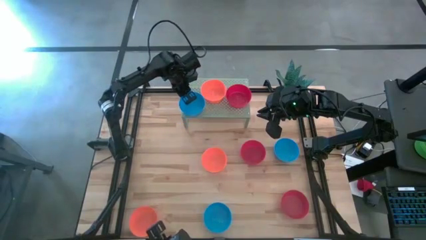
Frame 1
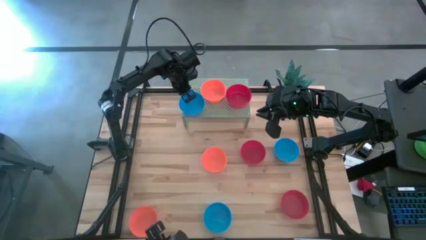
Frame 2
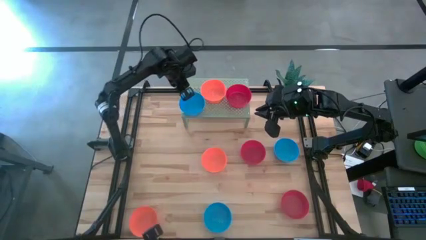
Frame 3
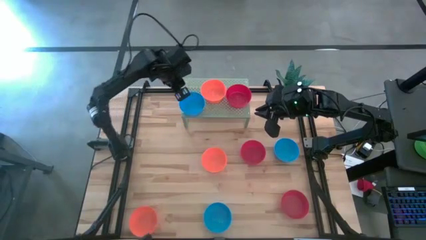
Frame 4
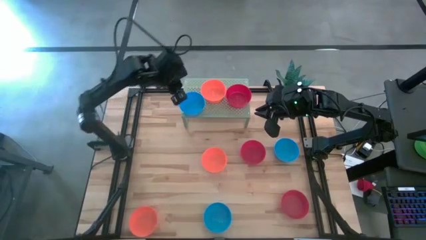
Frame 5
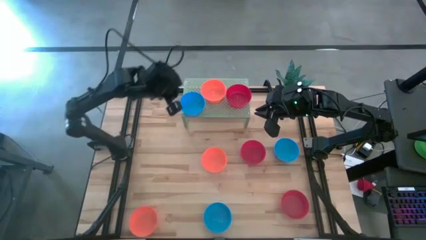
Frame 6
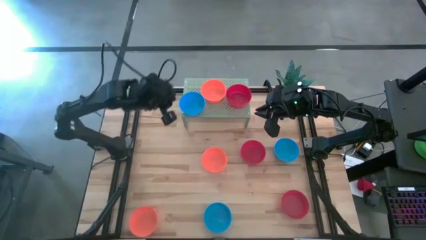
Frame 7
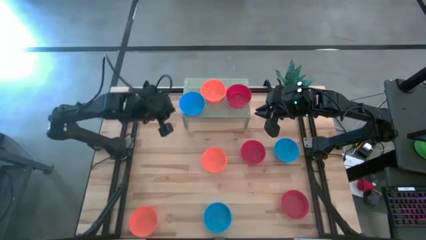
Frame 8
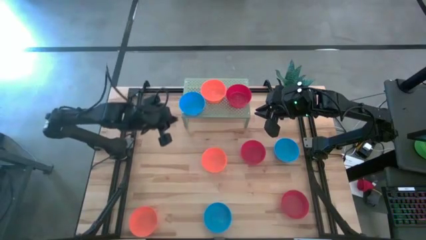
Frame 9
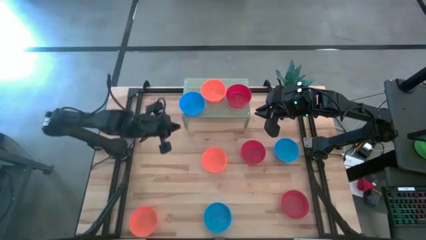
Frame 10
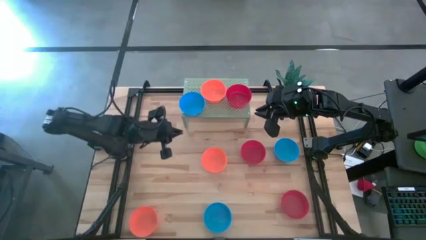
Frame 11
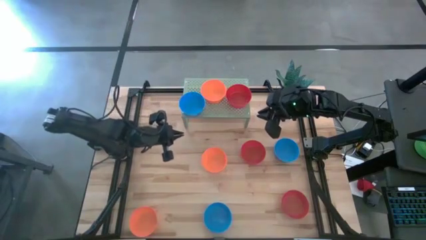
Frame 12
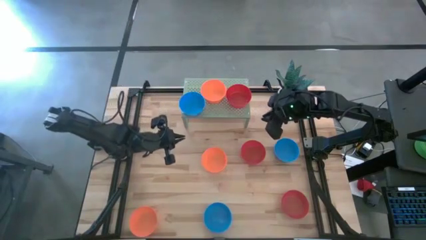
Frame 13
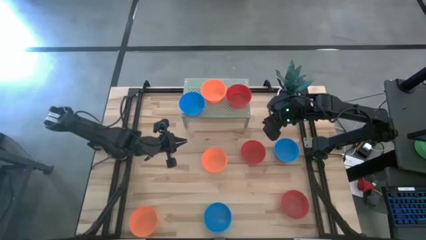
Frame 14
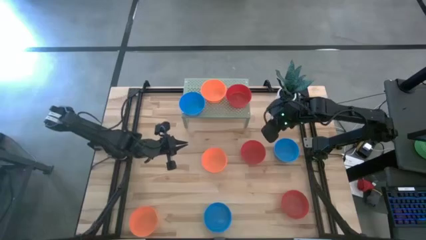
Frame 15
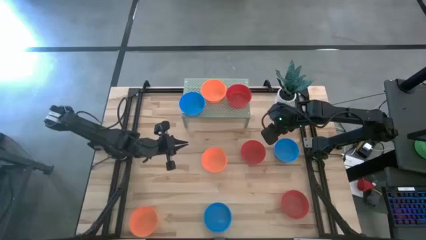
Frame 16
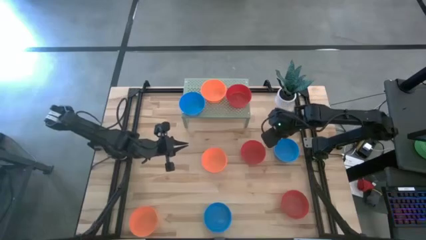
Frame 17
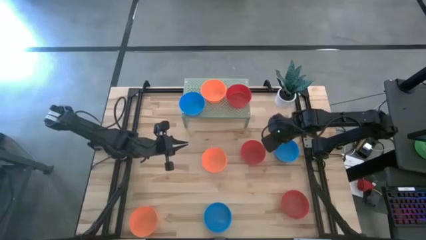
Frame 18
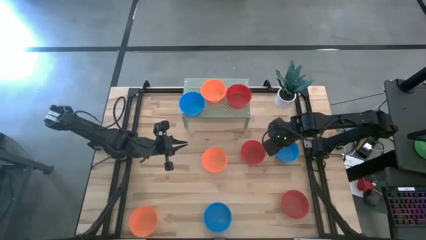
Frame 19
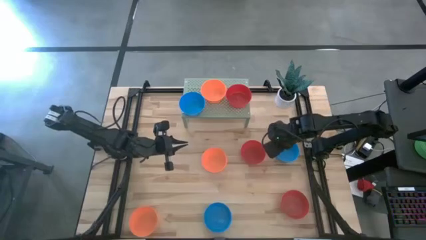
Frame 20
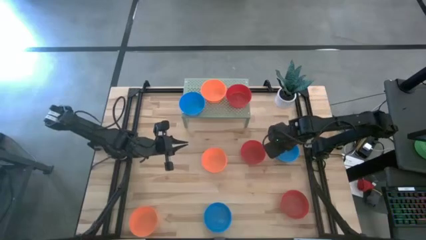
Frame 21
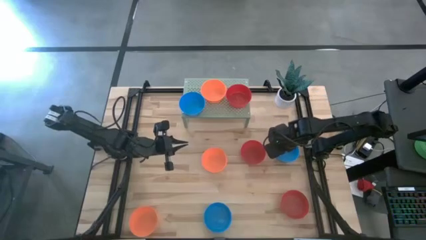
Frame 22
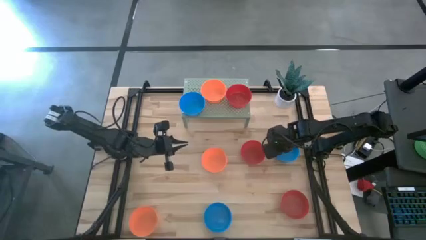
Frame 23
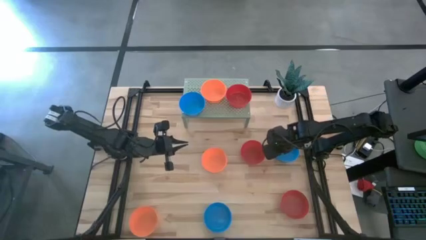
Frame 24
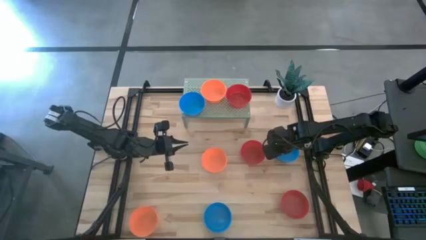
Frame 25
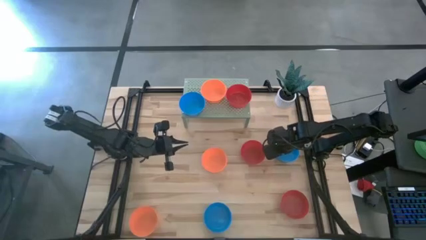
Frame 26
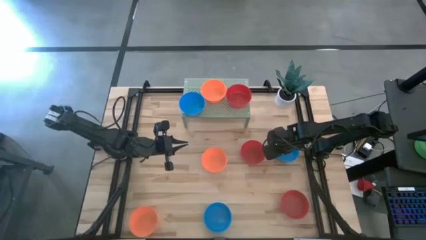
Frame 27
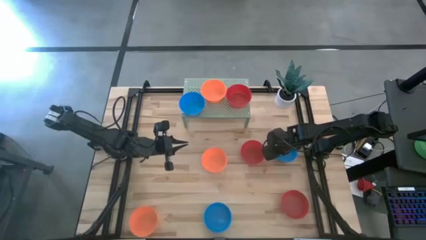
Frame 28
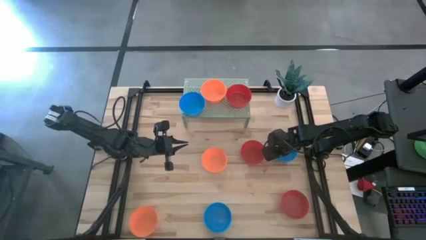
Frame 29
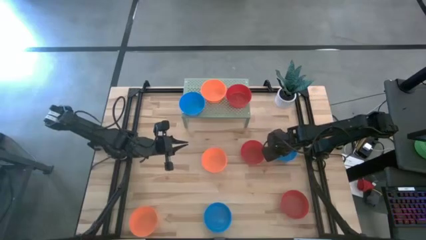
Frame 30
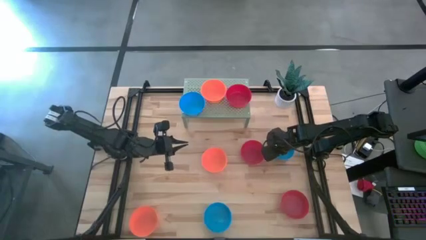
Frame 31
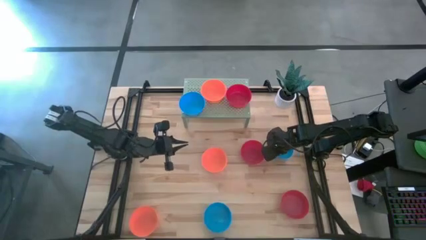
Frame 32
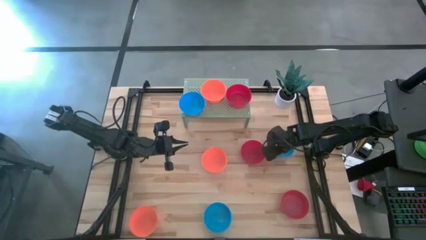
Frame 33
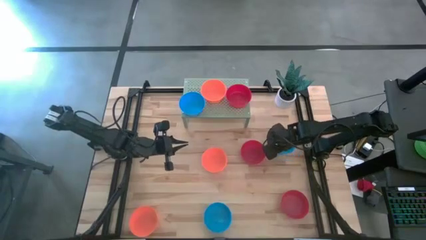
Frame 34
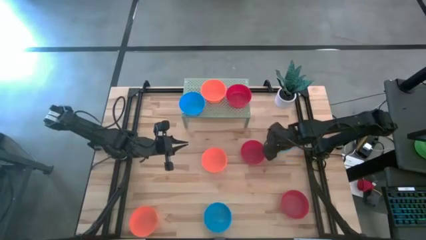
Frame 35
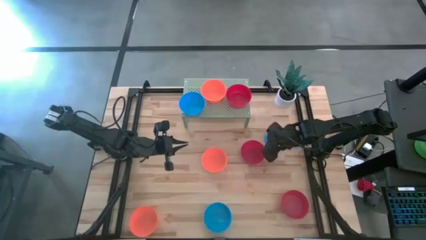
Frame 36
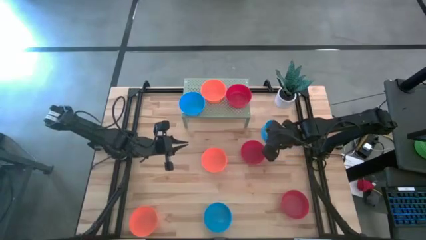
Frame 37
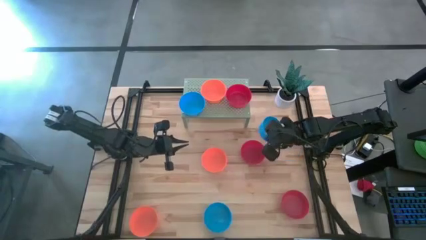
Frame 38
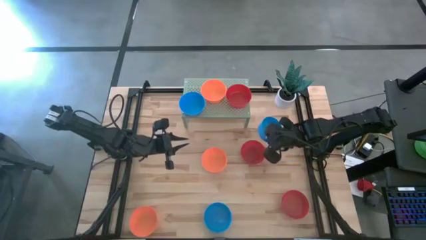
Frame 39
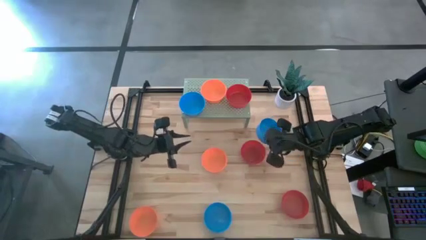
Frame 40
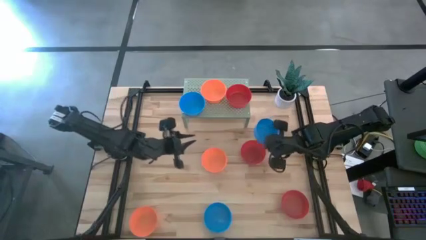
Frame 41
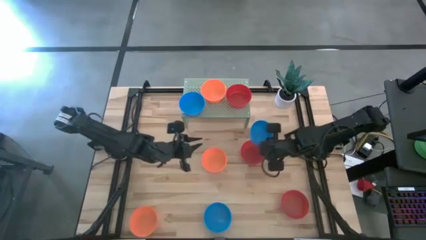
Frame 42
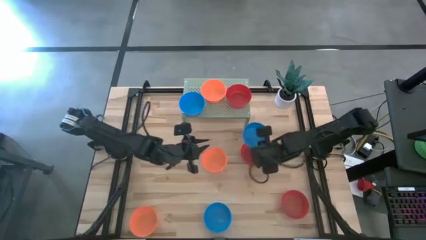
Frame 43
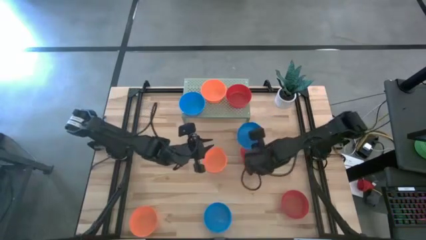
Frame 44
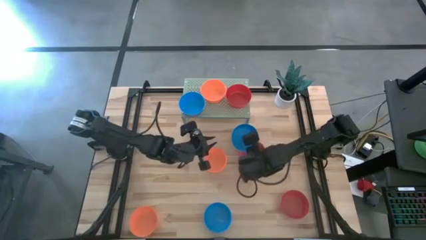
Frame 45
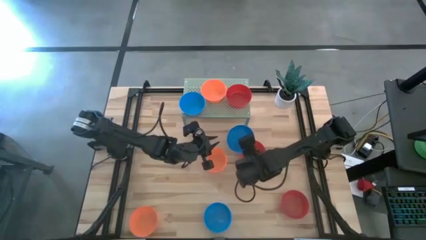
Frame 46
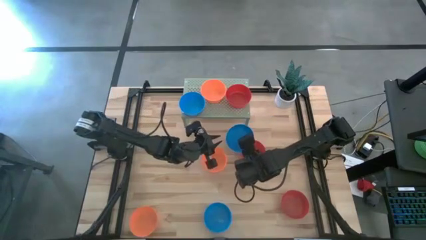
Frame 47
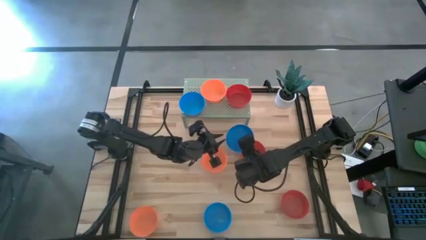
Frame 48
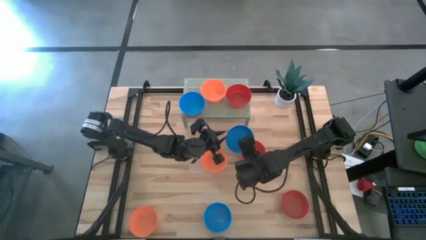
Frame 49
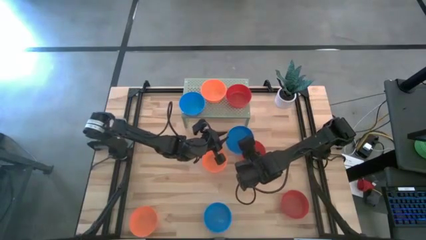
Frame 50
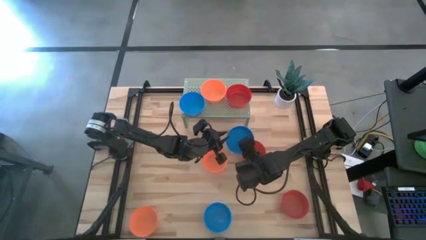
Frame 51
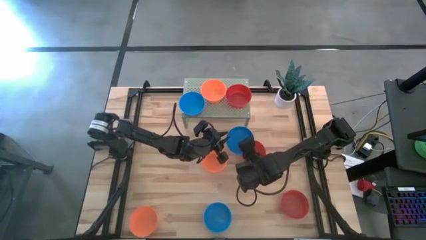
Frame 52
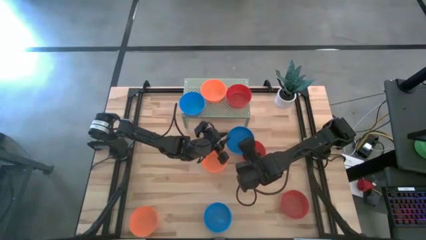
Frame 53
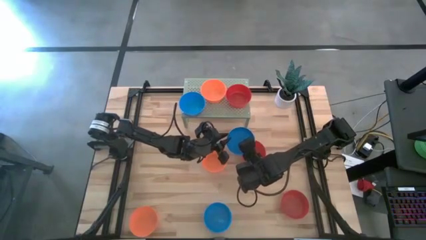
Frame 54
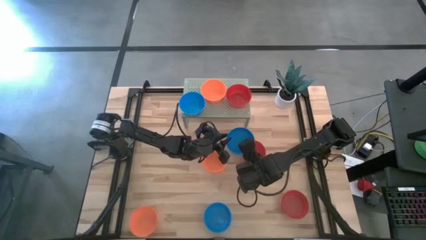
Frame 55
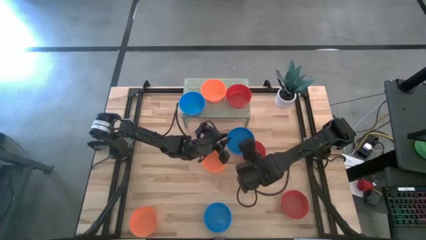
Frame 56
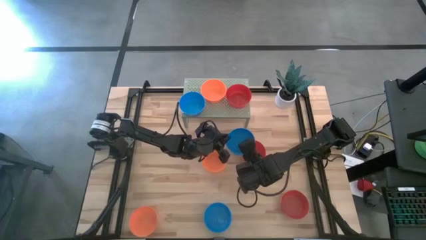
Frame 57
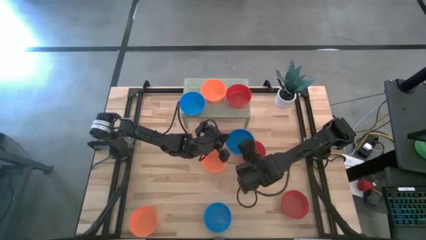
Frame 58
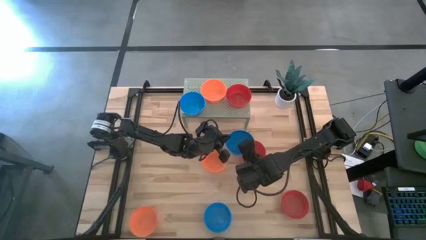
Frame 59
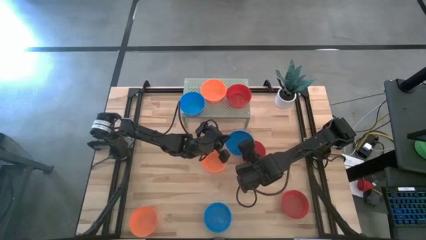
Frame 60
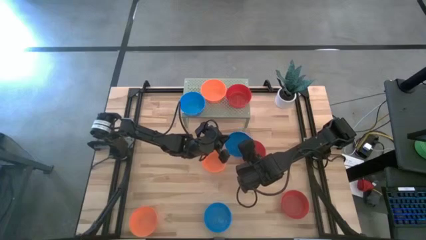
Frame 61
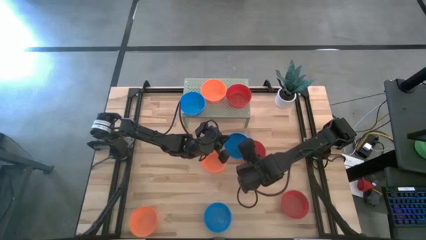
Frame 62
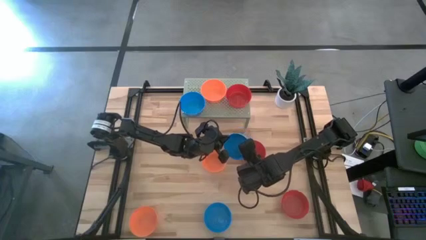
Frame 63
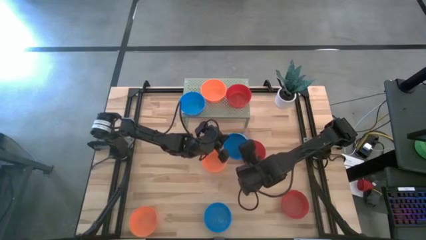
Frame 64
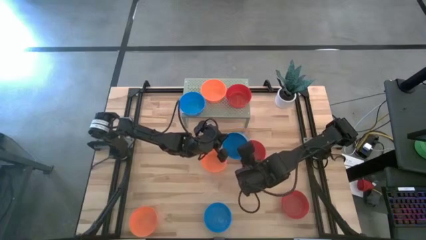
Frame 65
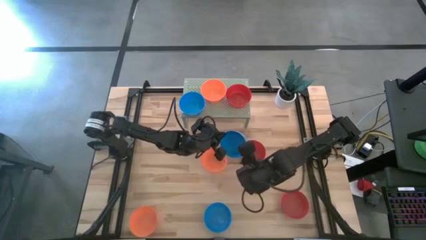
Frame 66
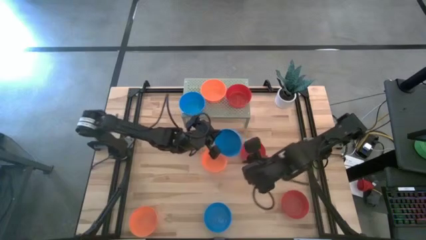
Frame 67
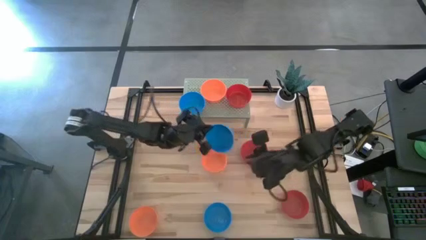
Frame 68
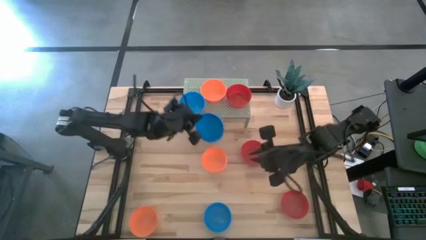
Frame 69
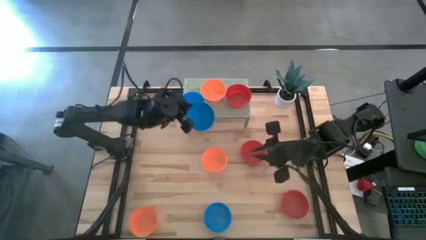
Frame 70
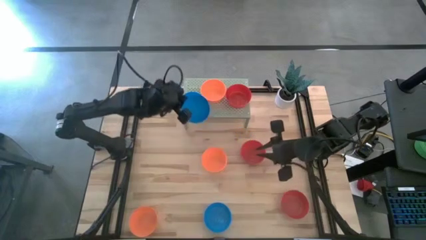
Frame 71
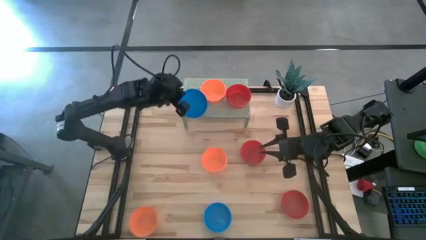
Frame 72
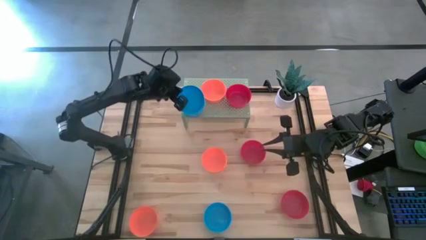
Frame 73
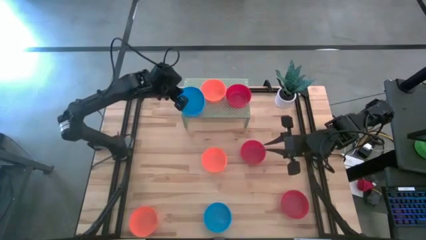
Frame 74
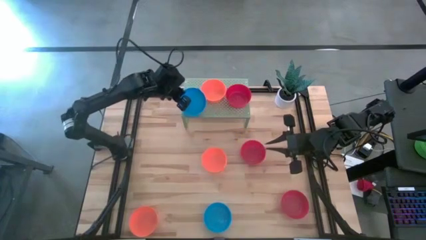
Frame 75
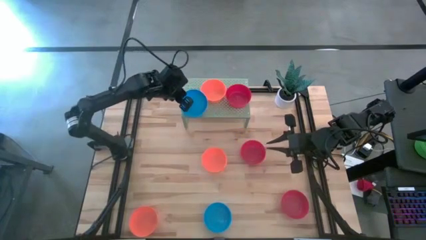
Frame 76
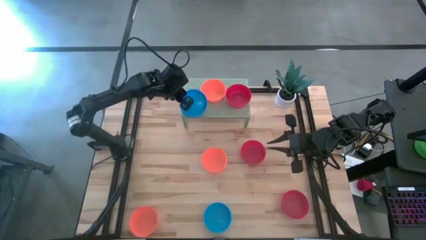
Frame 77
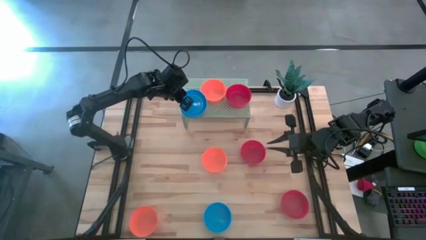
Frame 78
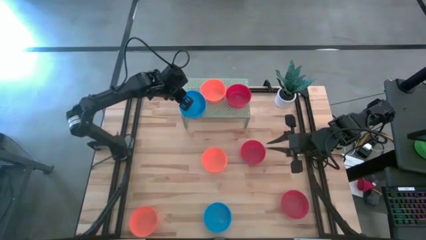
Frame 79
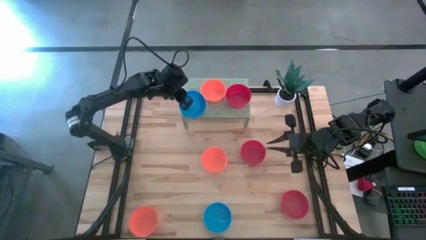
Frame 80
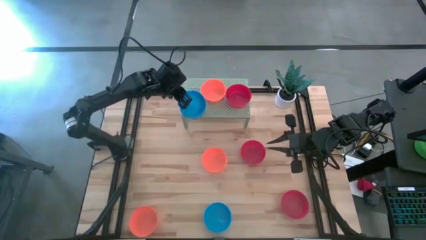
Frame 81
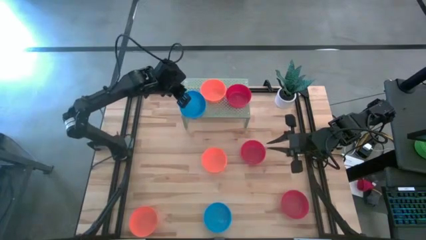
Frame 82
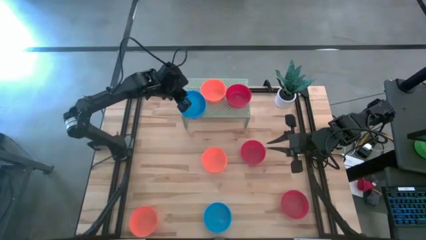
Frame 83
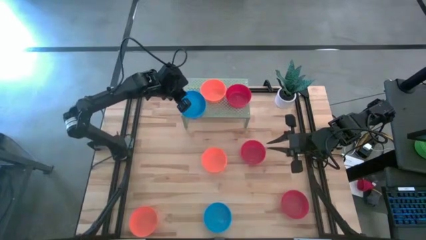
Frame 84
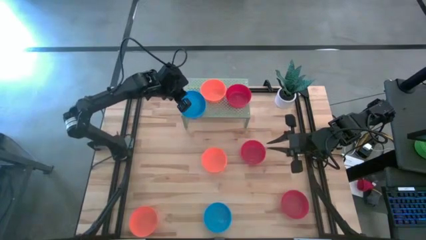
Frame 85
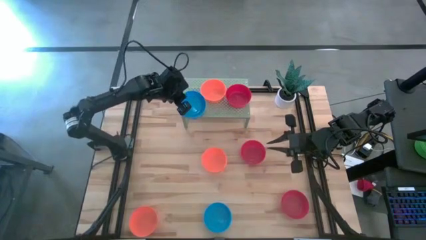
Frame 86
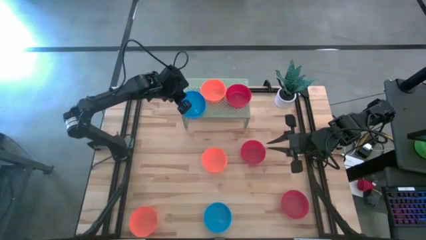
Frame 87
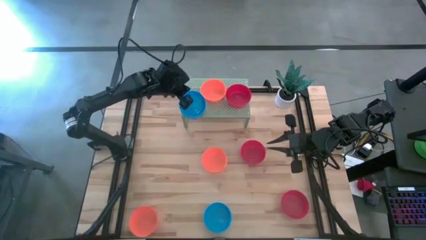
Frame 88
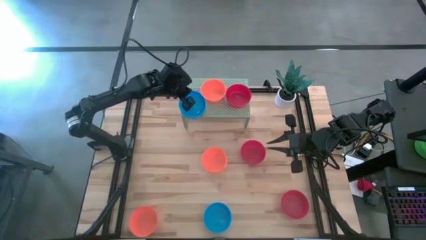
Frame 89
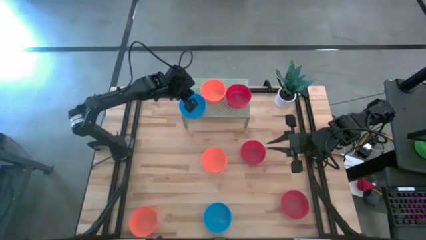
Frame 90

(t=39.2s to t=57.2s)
Task: Pick & Place Mini bowls
Stack the top blue bowl on the blue bowl on the shelf
